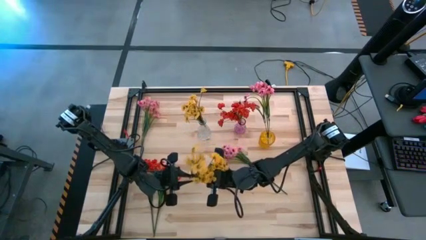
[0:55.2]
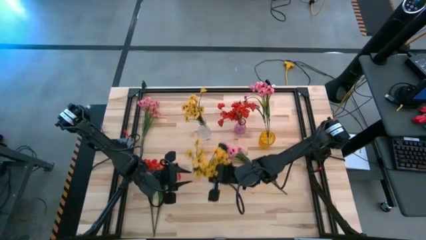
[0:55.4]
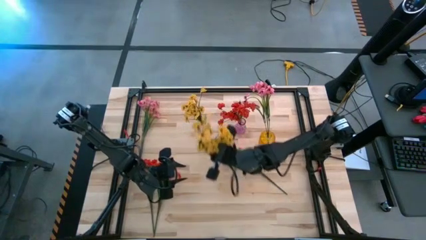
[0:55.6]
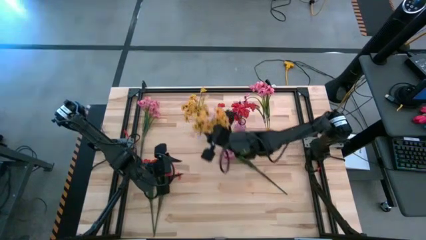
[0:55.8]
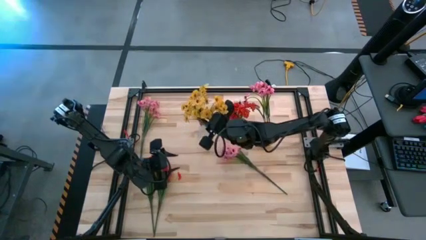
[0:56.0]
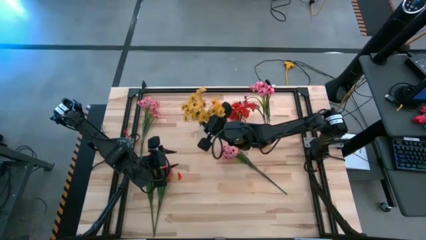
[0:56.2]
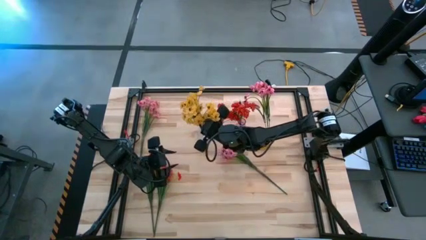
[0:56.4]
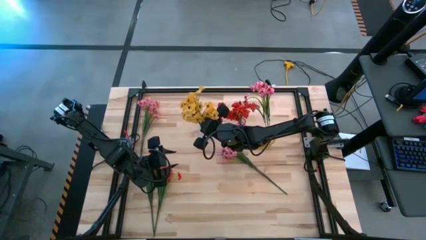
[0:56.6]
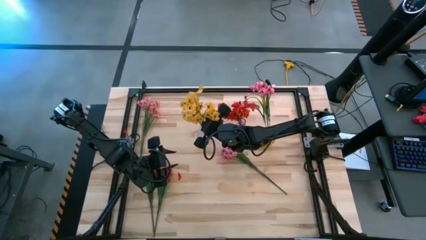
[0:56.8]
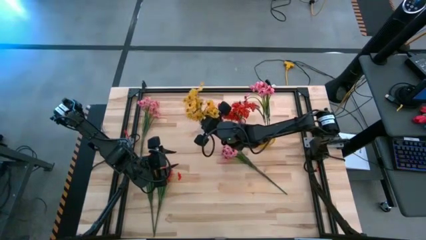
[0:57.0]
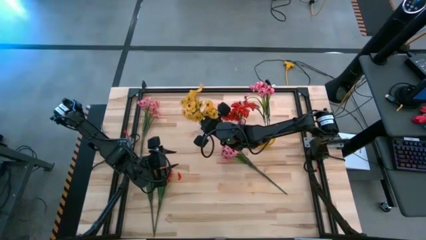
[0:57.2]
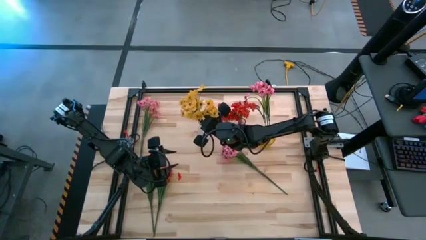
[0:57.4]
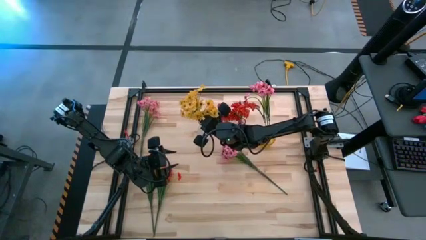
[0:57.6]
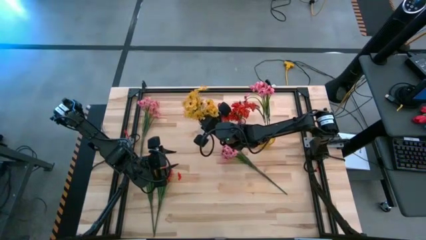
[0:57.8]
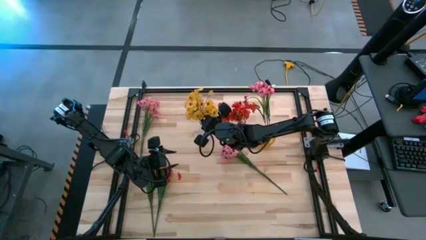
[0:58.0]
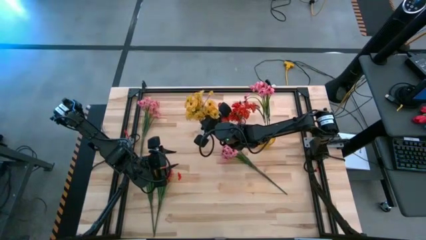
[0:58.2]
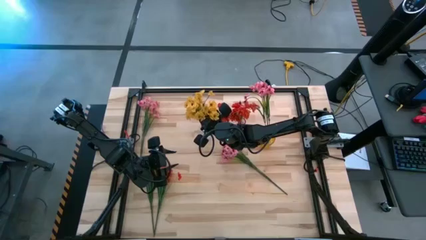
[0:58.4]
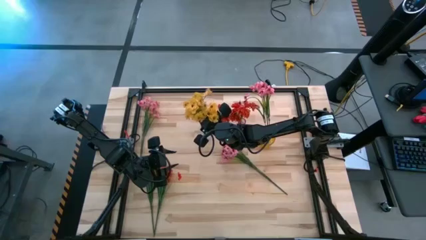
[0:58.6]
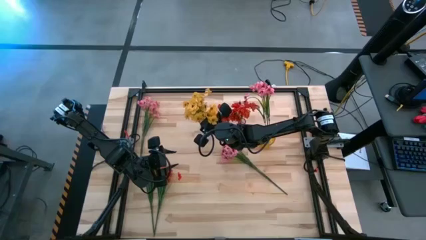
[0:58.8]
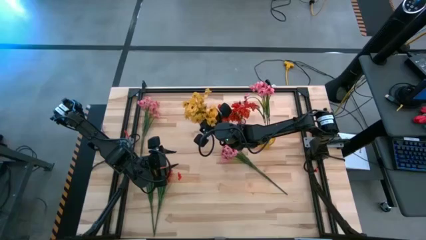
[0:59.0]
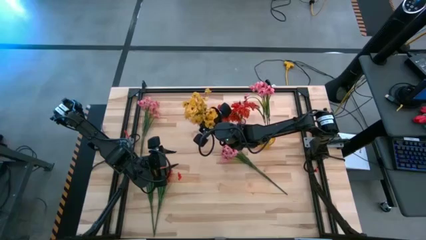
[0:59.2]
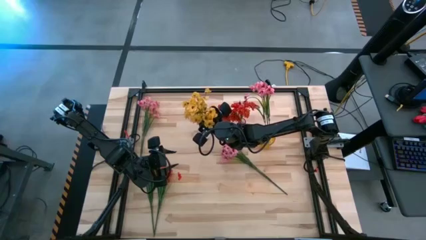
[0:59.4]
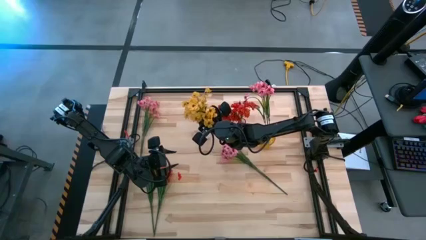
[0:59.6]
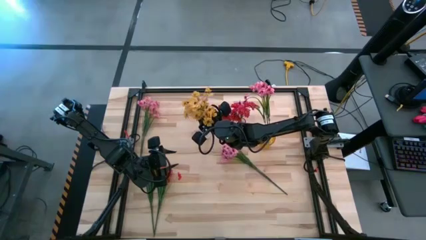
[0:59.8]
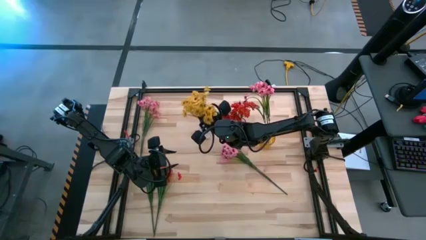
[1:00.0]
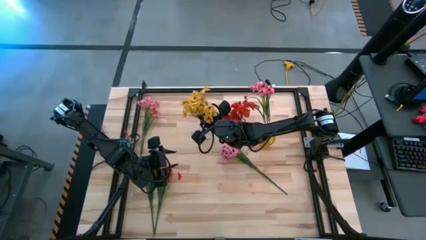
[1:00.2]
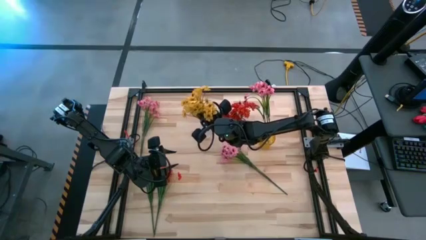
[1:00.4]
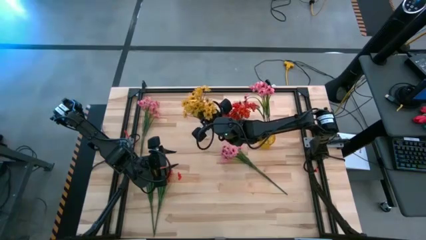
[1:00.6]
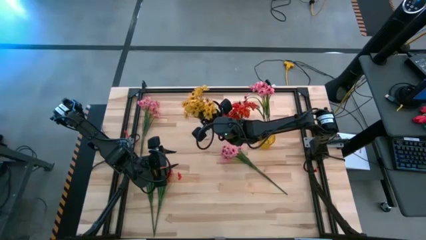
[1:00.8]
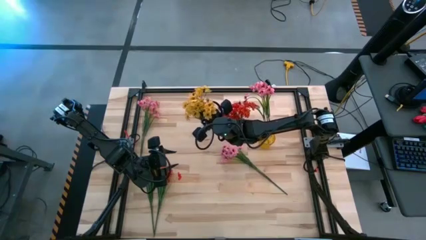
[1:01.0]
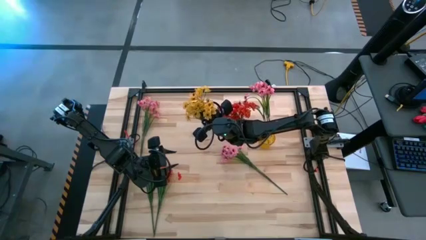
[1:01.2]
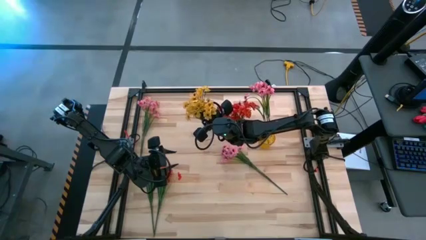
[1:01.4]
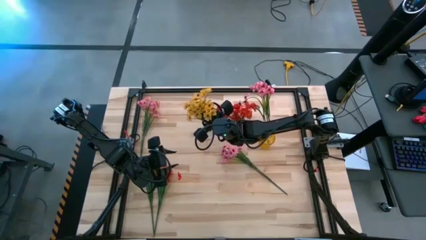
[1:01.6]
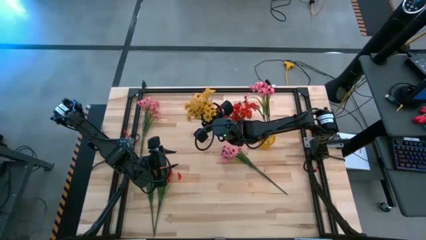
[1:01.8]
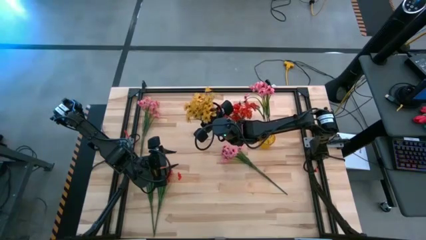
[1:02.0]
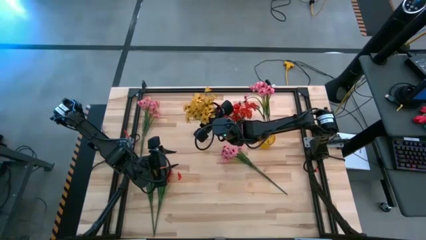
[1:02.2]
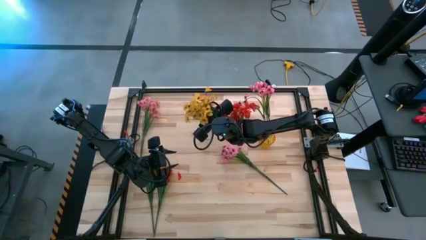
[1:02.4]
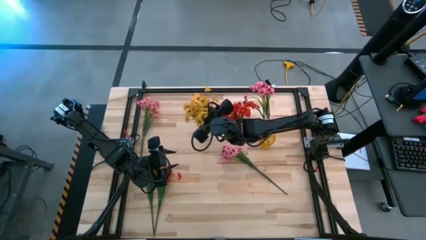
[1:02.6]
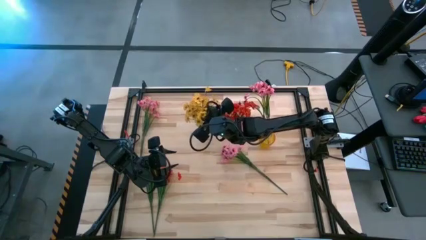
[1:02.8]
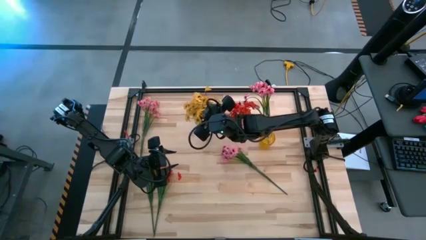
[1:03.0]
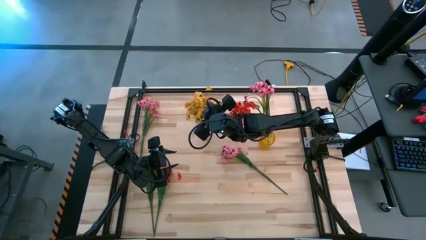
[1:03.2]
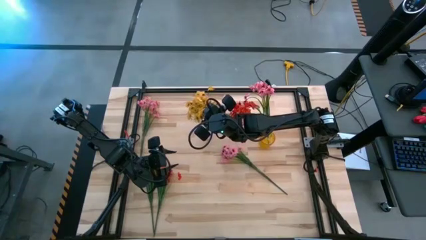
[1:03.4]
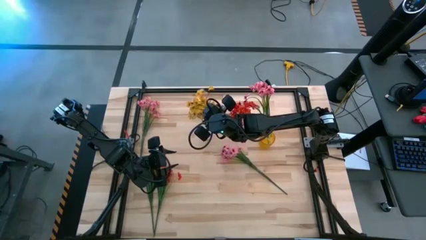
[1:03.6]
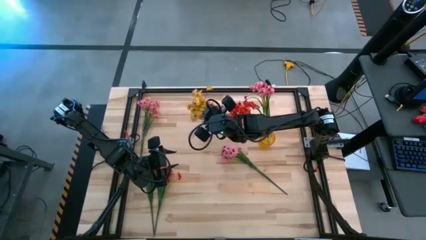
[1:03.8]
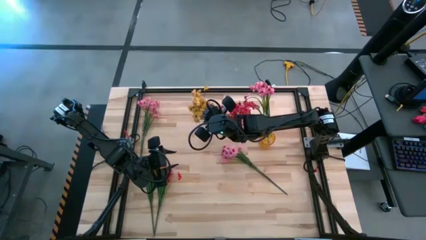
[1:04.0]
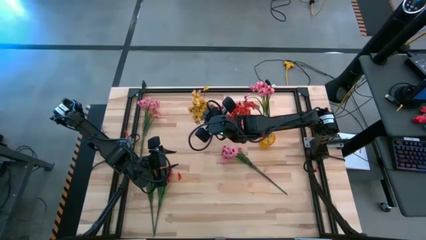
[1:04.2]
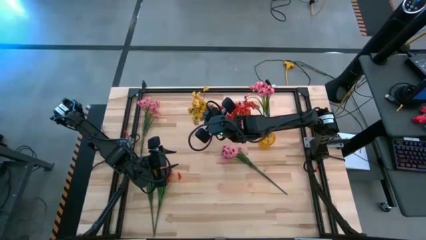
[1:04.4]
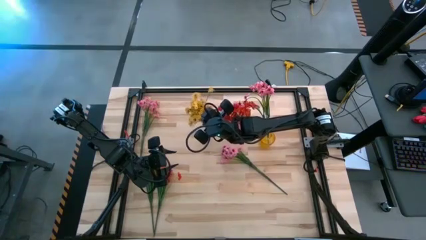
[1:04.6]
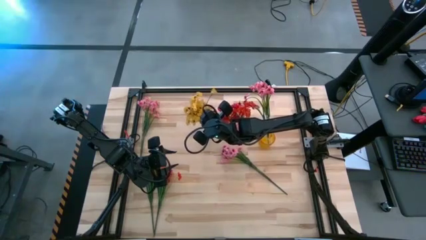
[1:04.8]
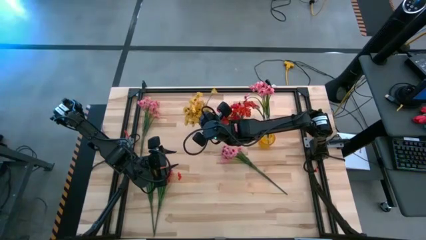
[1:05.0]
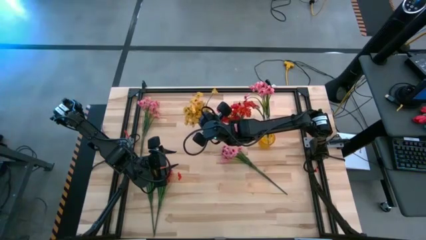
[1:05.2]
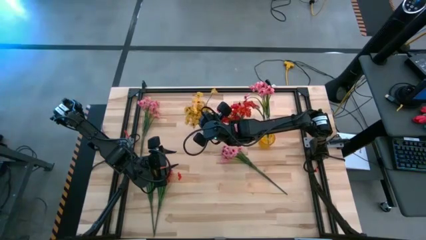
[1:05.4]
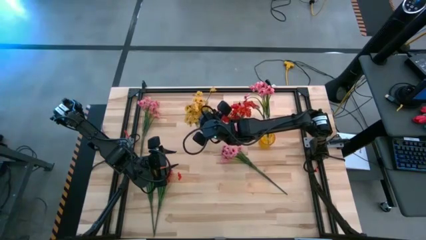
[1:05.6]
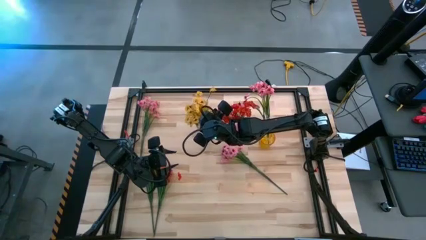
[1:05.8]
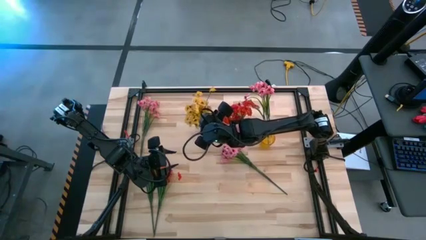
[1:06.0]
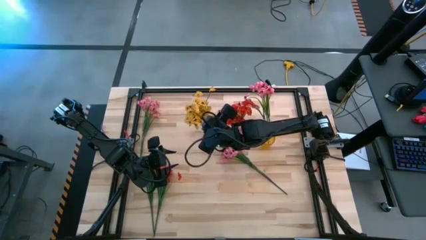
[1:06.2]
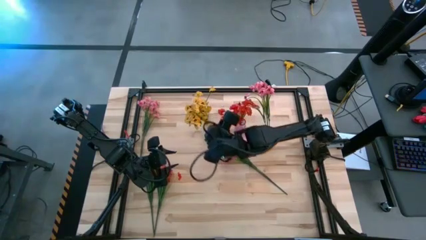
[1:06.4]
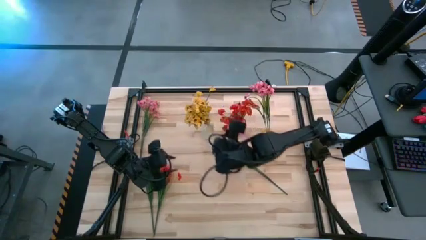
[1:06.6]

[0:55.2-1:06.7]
Task: Sort flowers into vase by color
Put the yellow flowers into the transparent vase

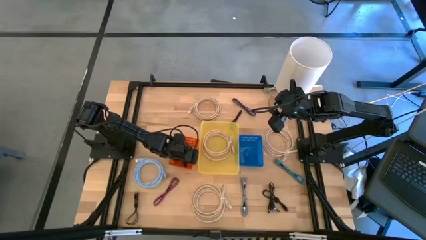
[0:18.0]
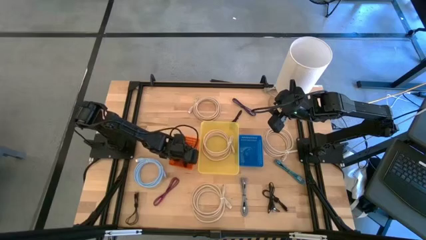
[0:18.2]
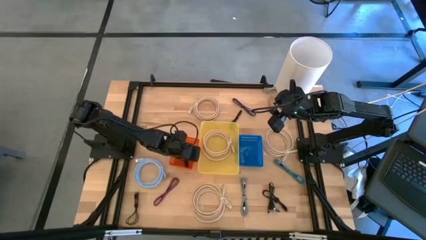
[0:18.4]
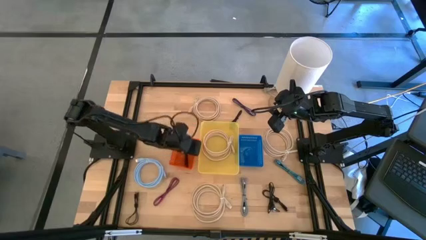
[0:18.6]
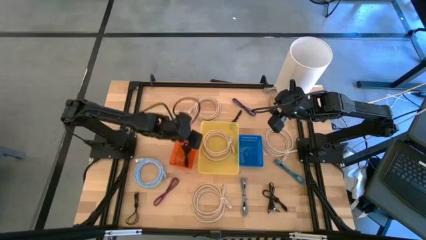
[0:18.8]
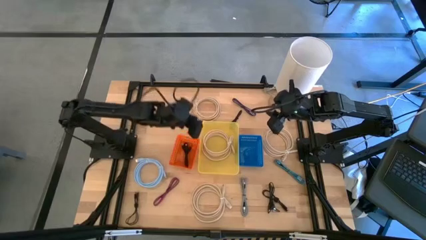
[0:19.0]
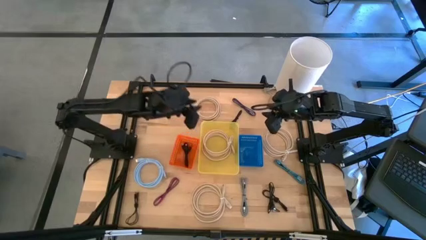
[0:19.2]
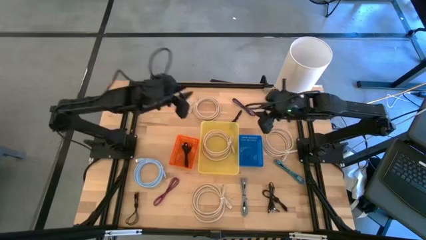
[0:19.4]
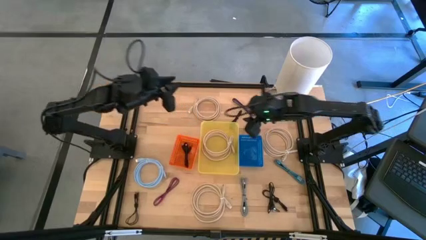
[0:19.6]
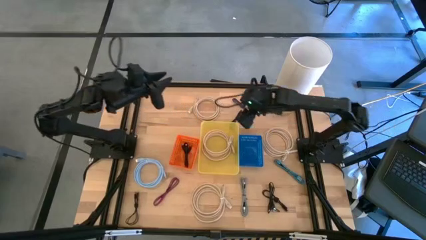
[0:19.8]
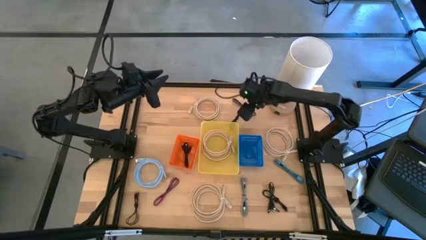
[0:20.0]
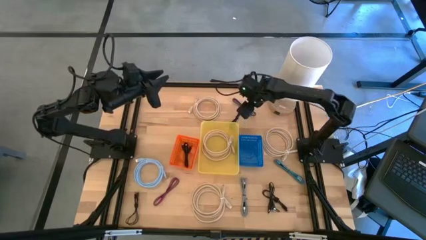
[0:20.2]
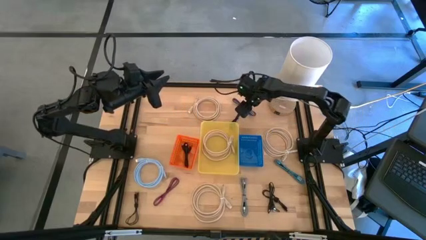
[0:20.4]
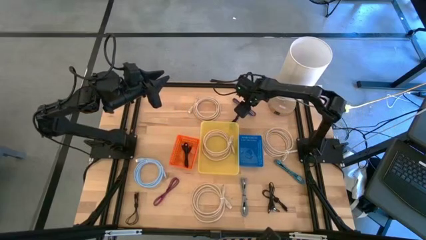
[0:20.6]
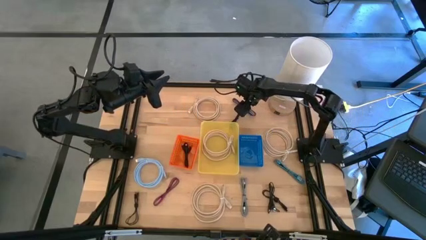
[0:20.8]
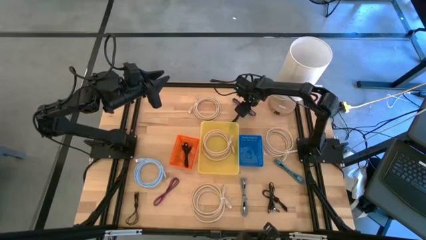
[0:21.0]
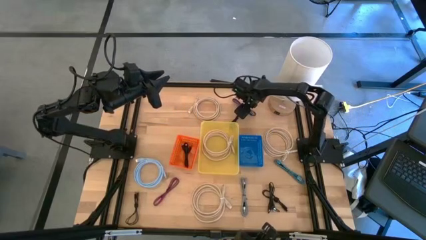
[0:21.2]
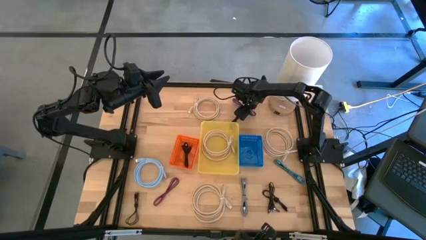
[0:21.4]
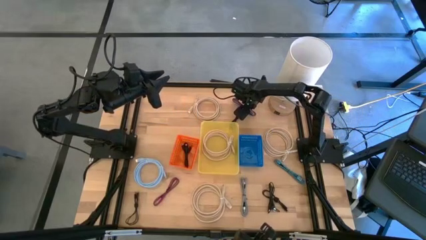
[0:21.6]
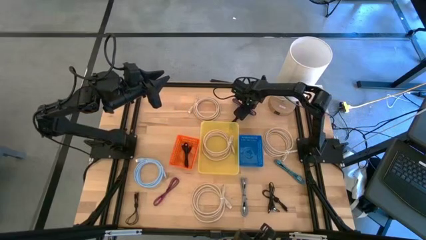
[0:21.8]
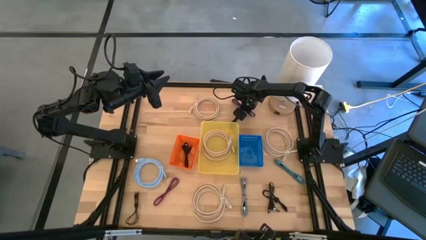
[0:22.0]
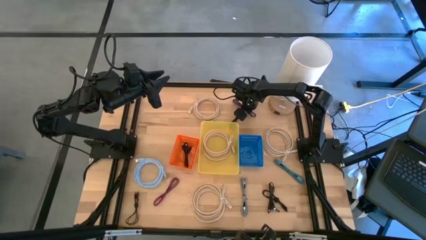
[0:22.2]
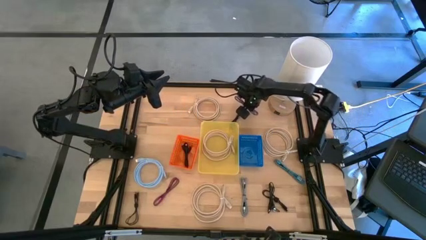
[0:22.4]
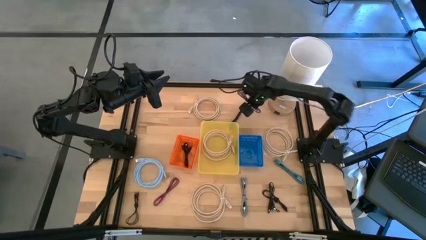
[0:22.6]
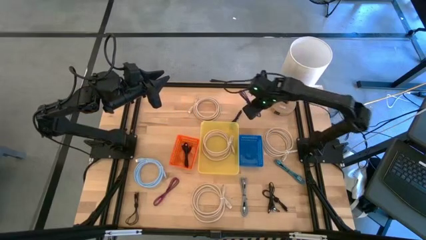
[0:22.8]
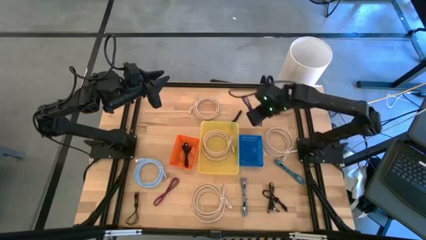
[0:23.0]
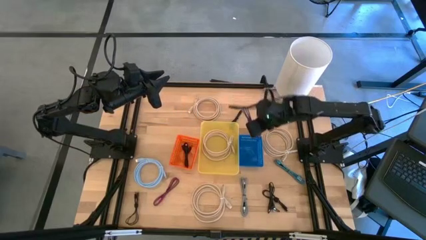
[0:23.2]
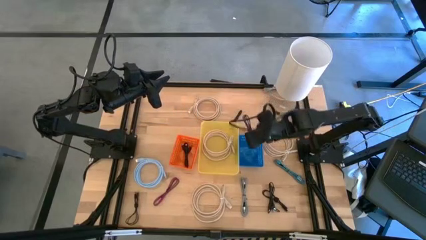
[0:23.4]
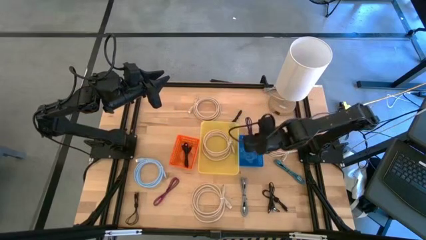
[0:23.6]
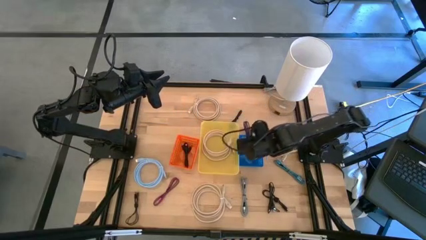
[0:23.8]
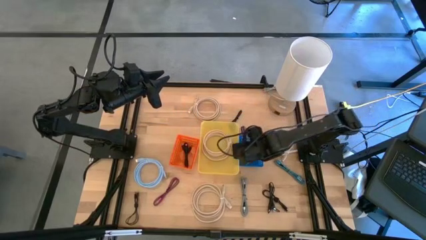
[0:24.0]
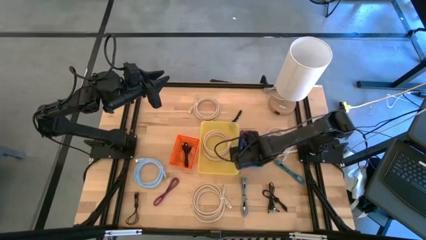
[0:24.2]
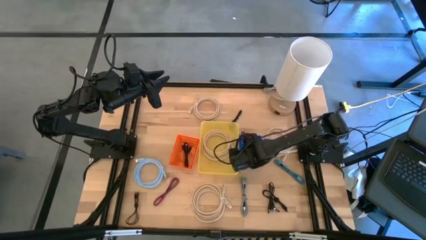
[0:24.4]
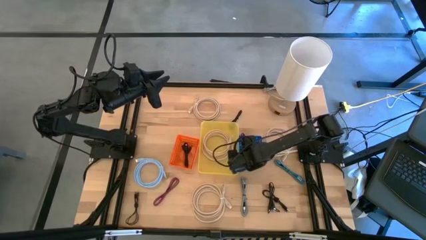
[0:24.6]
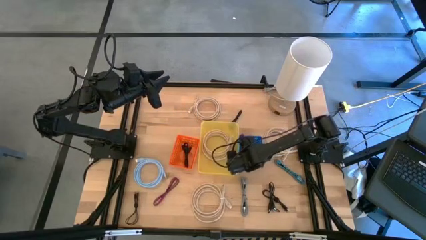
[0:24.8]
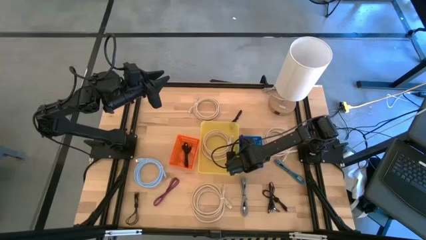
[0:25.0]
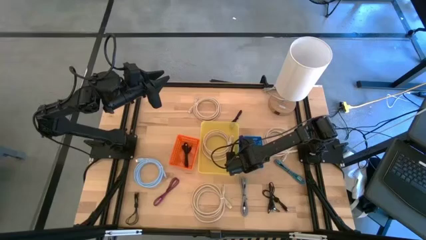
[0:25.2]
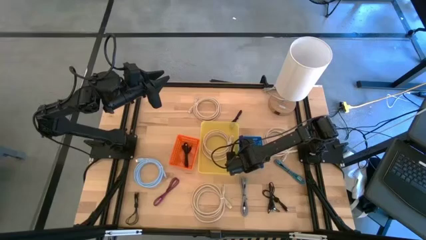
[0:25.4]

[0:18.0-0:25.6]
Task: Pick & Place USB Port
Put the purple patterned usb cable into the blue bin
